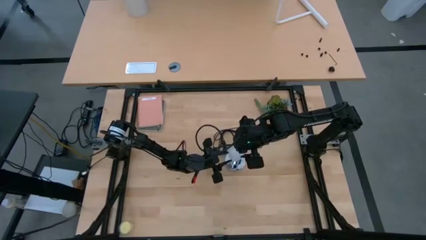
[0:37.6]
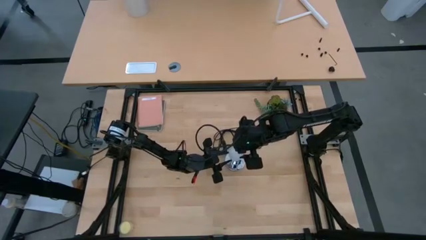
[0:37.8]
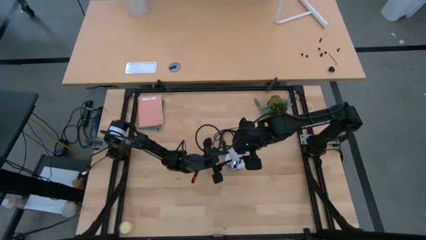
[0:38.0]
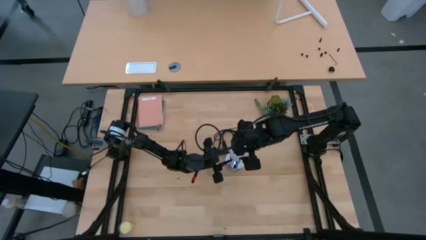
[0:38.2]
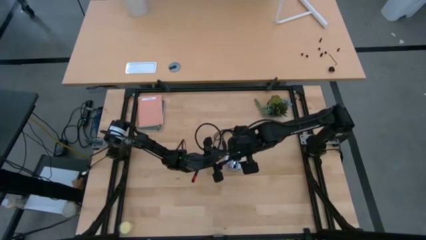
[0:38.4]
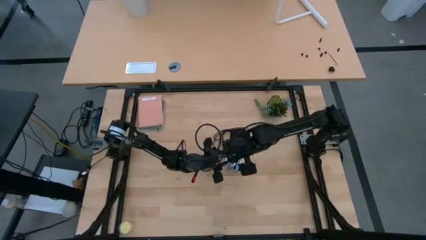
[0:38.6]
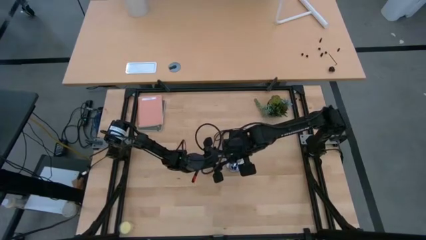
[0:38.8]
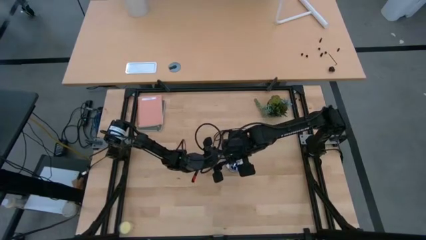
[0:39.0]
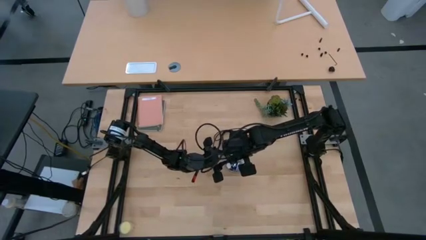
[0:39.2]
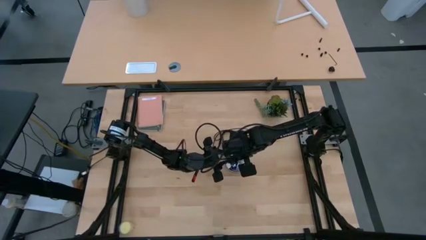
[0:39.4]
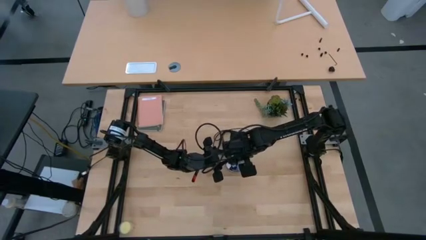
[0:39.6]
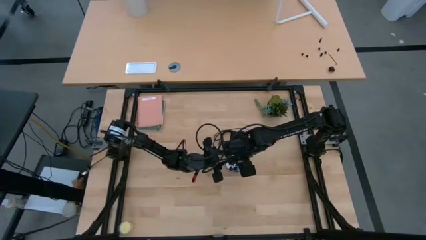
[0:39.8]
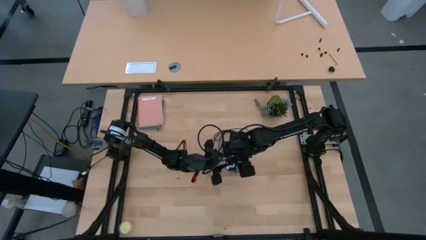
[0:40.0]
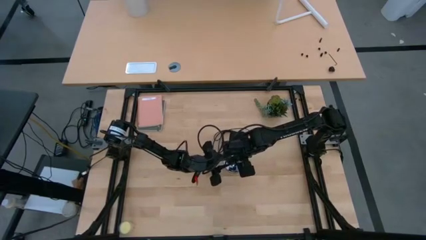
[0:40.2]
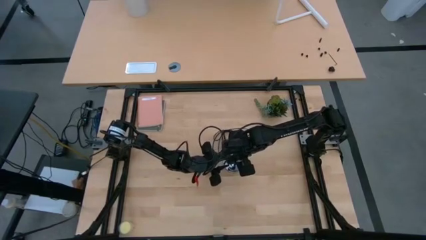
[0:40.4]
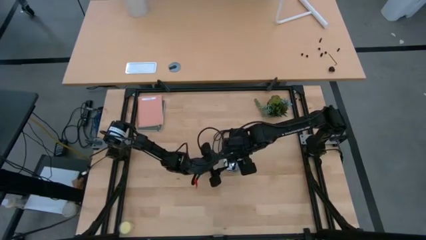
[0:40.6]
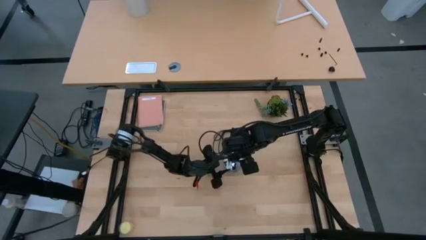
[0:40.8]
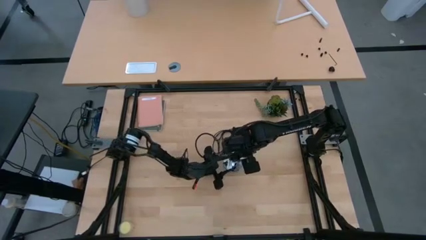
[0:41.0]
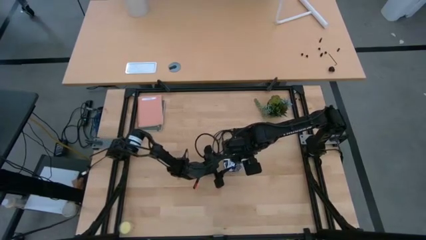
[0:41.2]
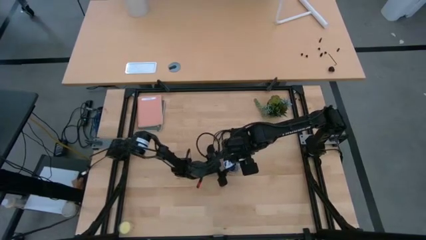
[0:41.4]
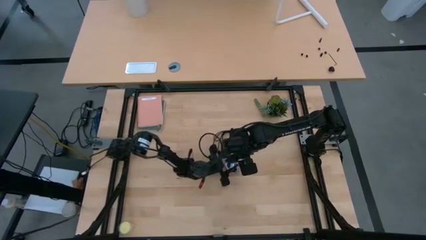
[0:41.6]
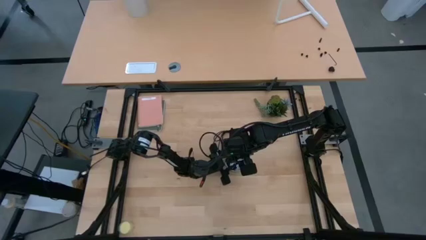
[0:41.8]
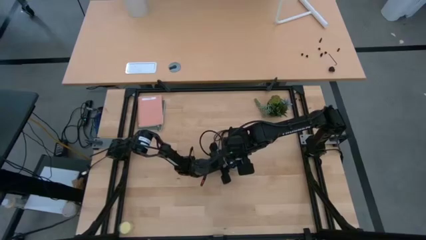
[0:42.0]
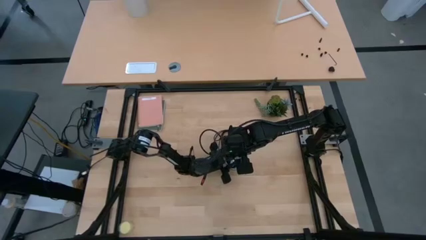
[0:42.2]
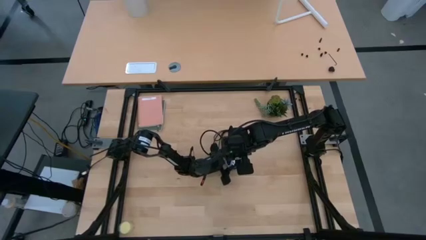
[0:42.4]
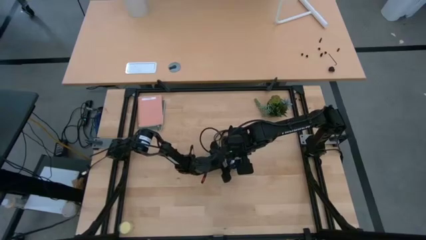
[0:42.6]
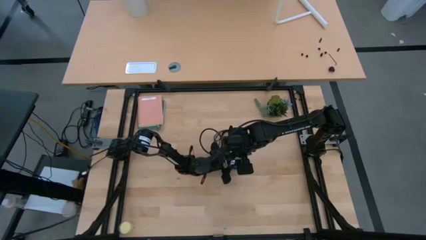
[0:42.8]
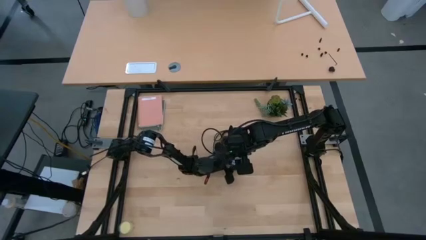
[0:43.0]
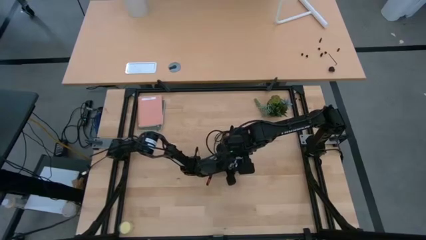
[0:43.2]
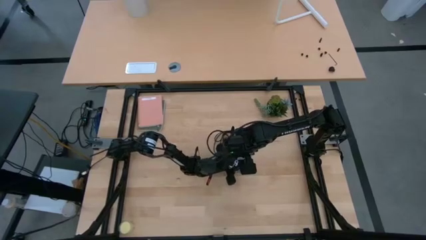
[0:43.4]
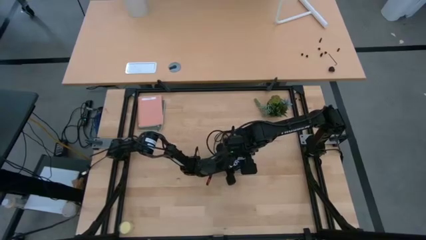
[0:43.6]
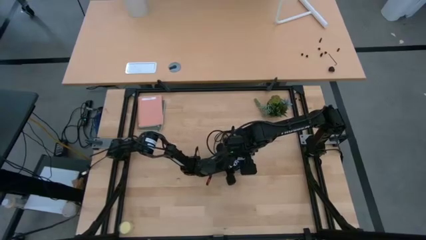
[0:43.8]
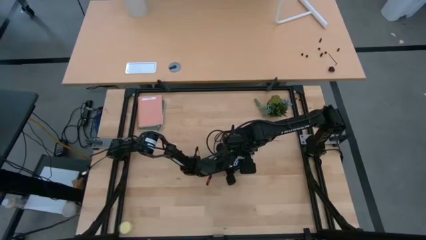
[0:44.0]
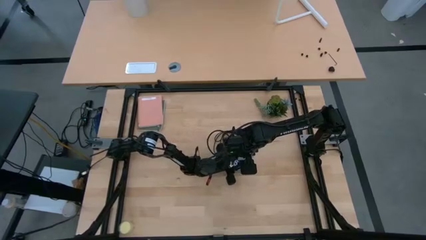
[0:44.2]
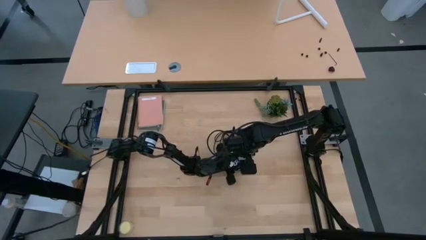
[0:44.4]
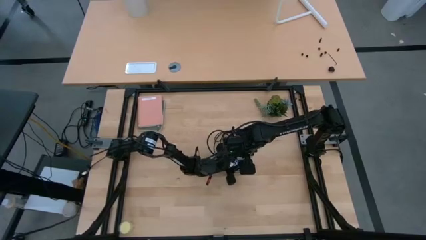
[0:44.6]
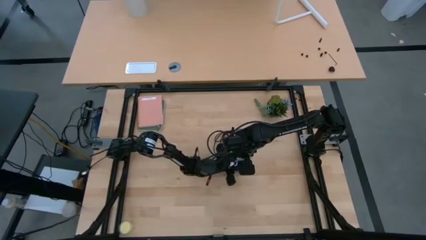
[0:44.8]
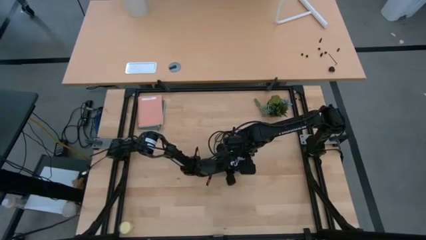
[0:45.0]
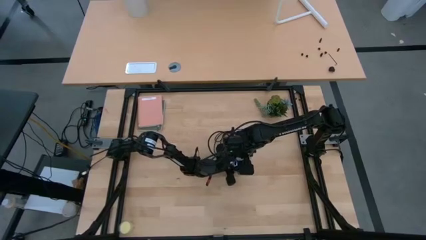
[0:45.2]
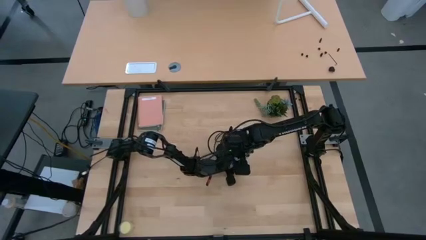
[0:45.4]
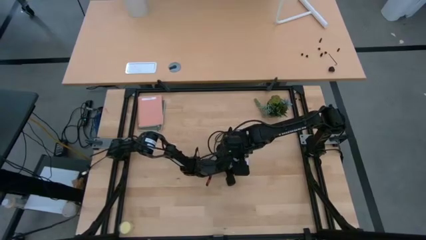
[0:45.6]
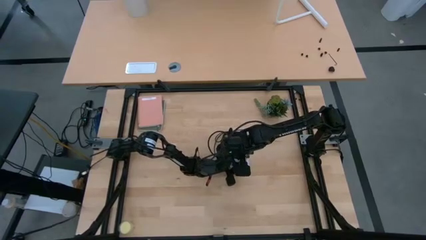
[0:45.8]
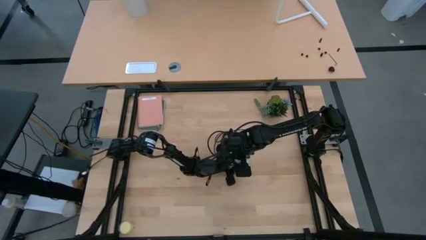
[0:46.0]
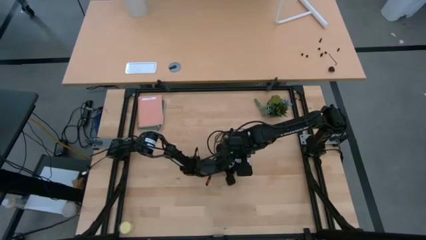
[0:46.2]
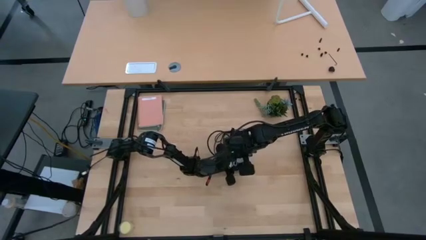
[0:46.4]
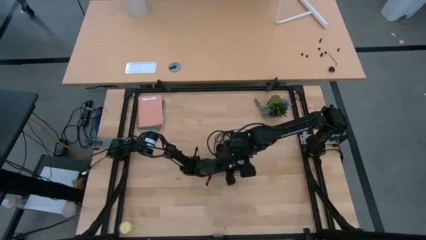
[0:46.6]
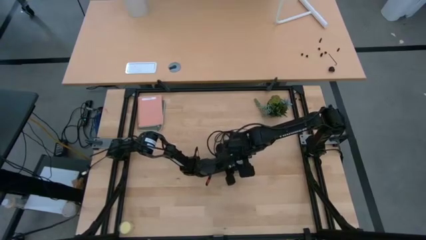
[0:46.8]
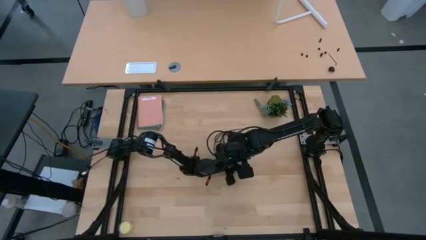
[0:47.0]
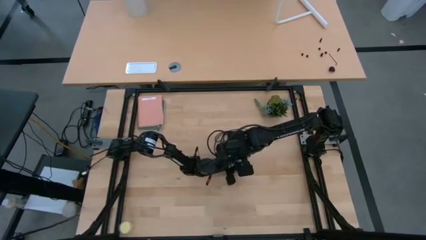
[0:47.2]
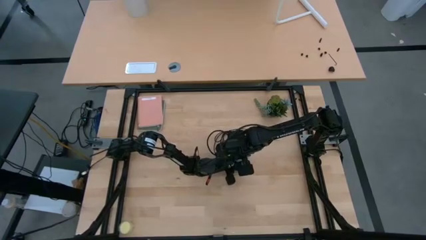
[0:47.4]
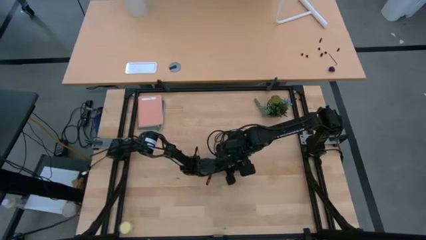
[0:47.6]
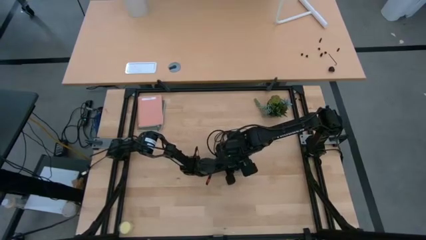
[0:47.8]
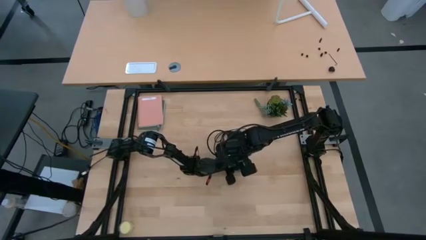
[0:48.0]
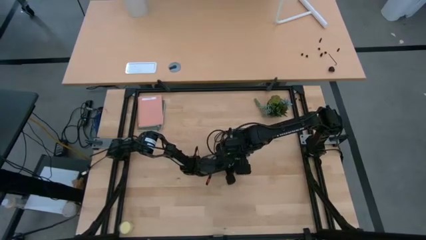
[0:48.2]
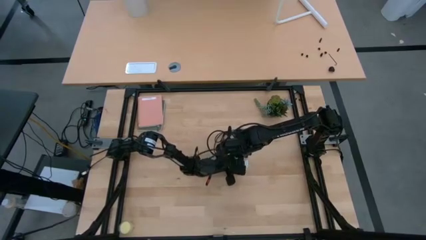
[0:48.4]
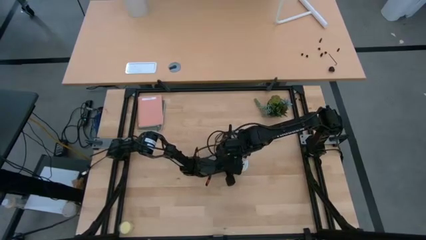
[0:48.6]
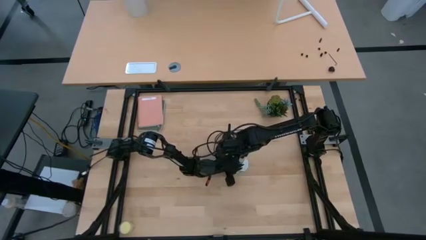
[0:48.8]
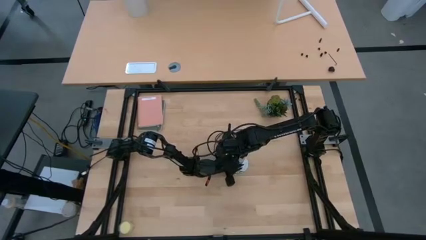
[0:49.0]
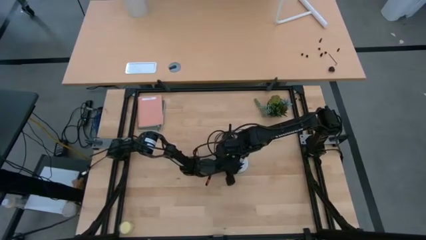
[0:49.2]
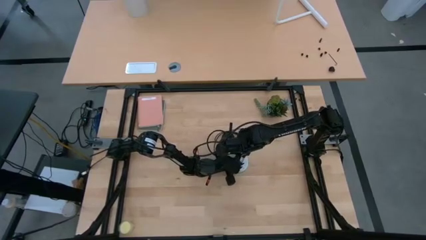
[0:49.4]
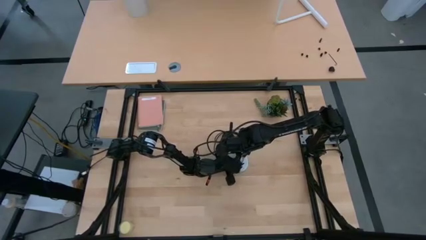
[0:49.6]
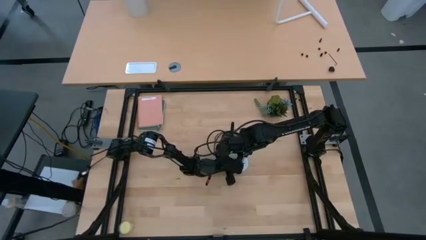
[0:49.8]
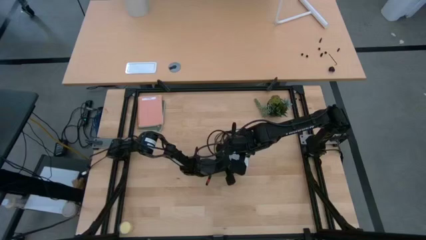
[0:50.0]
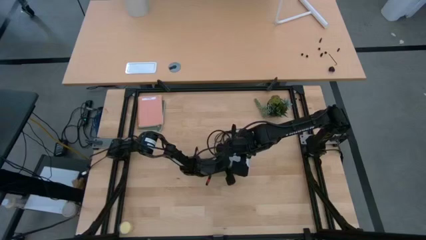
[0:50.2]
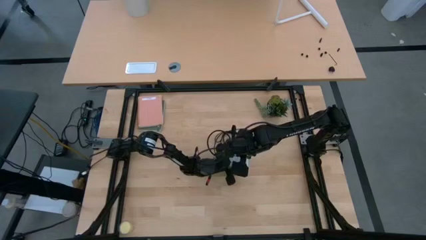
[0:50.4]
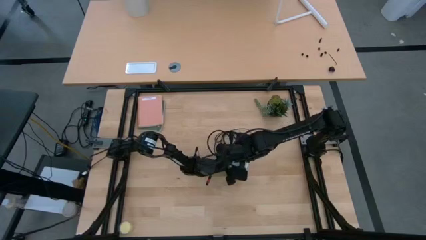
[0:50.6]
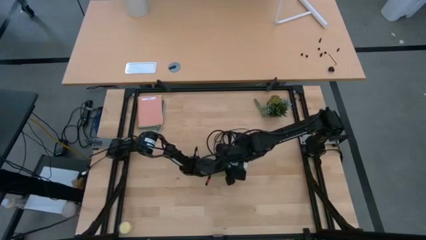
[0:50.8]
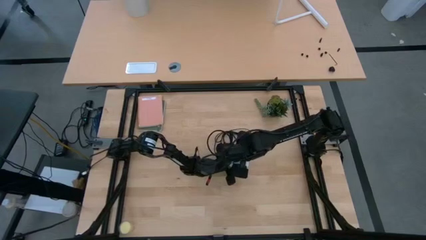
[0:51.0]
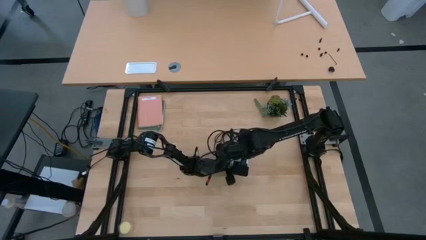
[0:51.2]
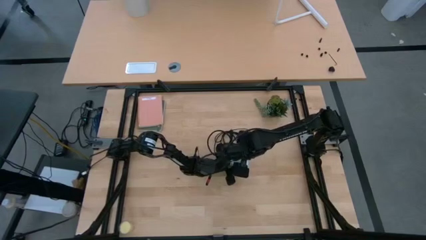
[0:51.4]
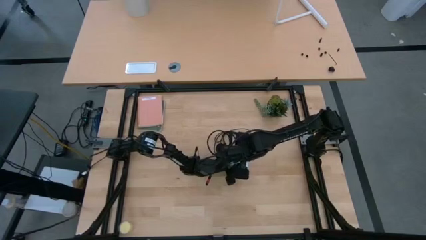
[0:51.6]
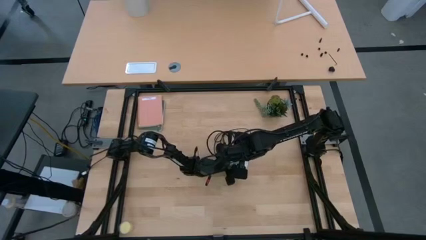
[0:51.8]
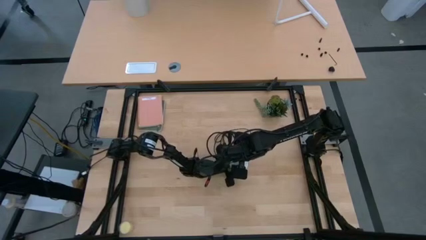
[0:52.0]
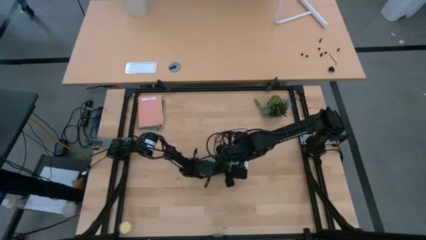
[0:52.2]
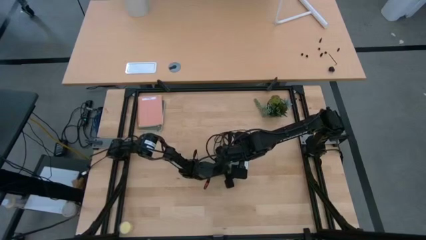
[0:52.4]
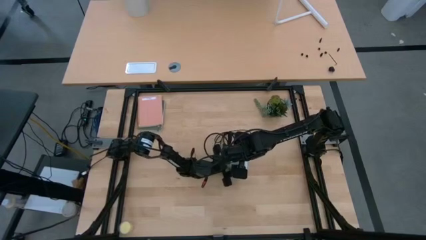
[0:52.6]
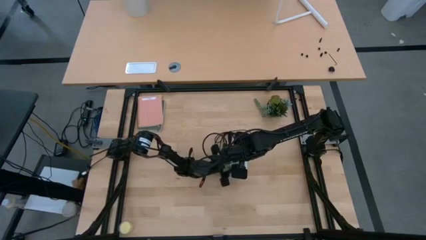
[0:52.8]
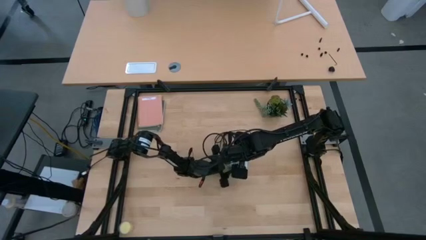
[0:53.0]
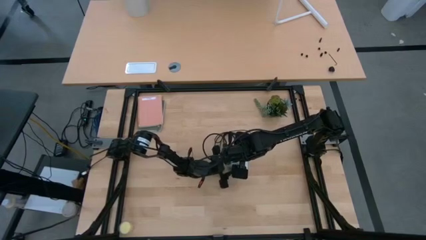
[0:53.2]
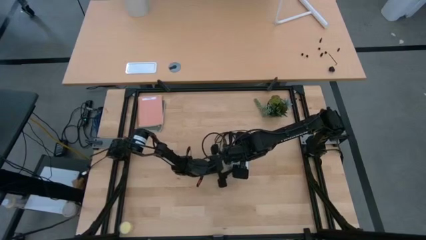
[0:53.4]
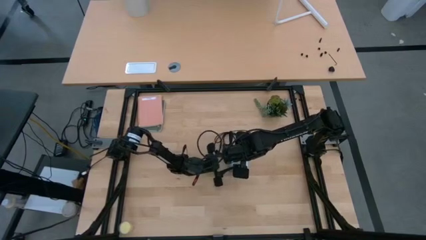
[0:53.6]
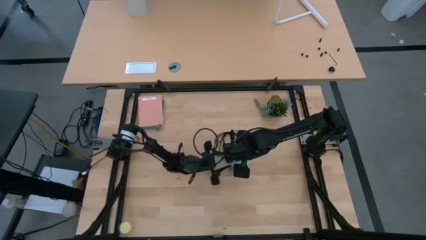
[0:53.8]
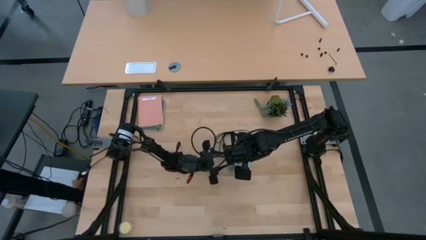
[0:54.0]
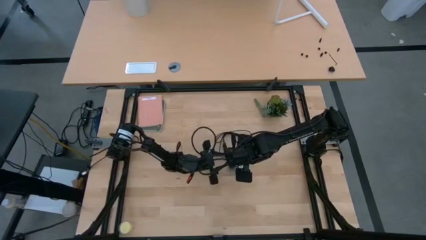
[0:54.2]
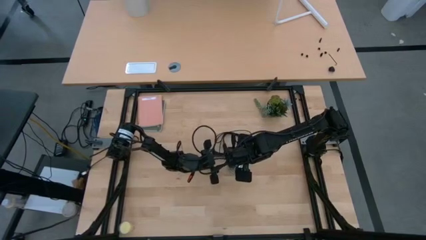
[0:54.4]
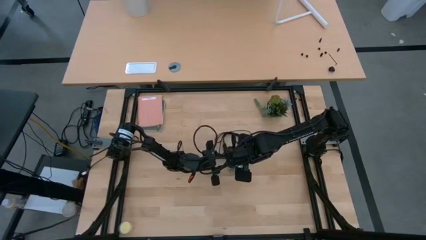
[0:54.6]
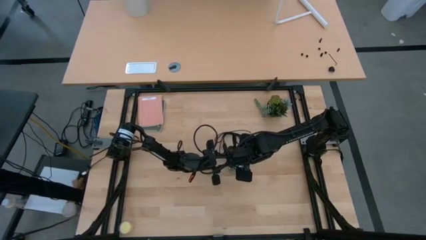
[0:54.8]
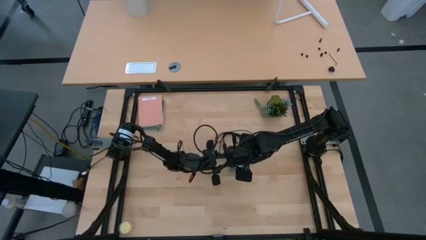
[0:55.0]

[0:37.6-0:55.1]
Task: Screw lightbulb
Insert the white lightbulb into the silver lamp
